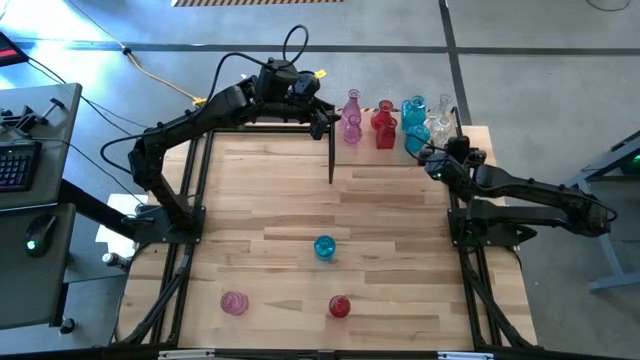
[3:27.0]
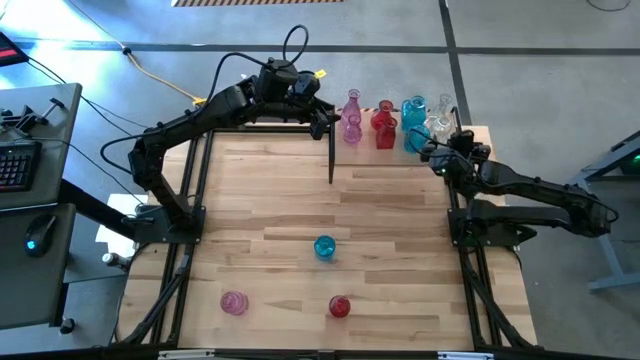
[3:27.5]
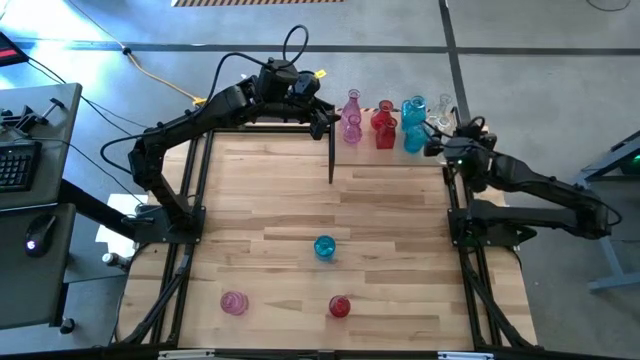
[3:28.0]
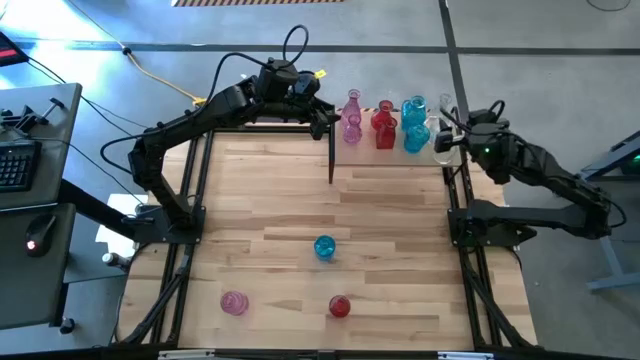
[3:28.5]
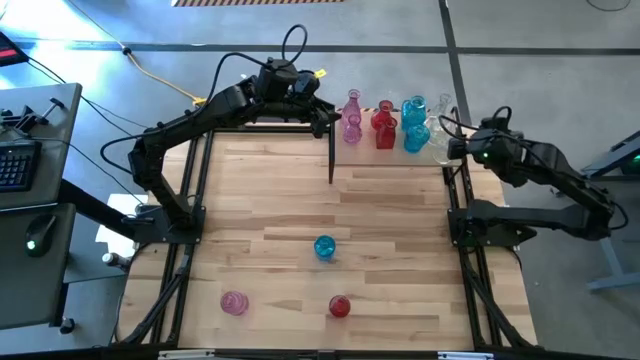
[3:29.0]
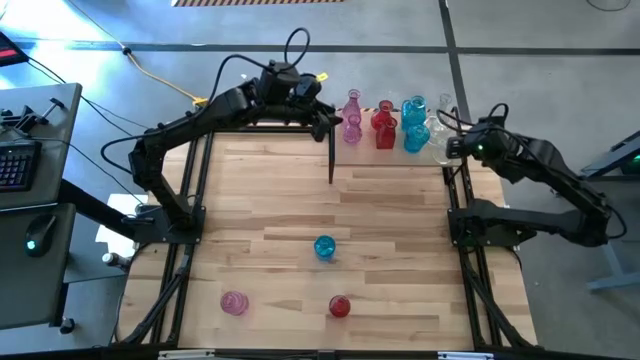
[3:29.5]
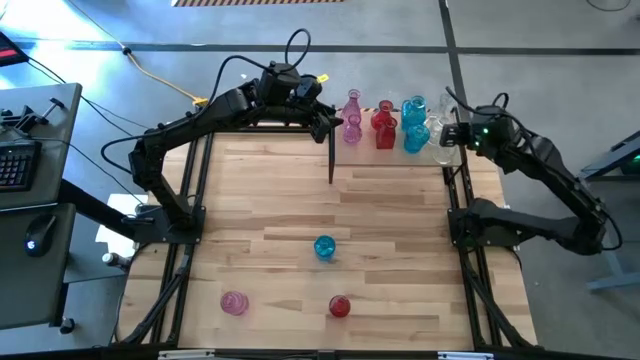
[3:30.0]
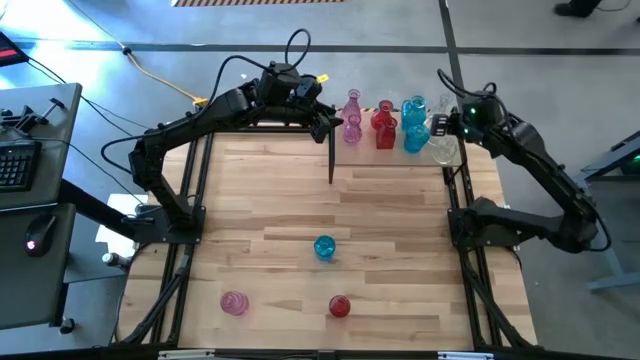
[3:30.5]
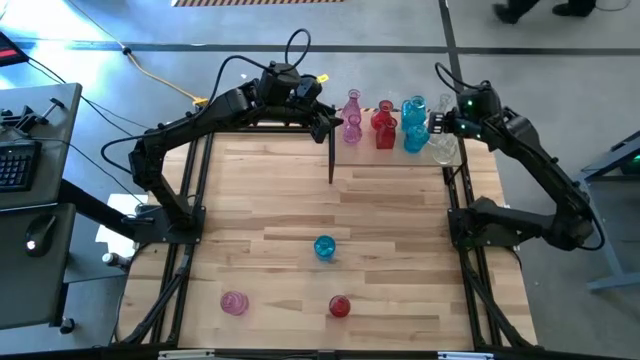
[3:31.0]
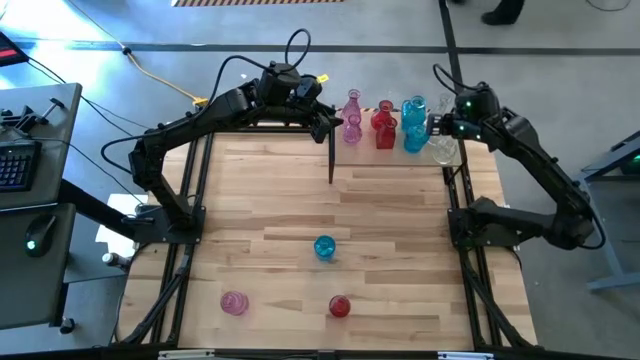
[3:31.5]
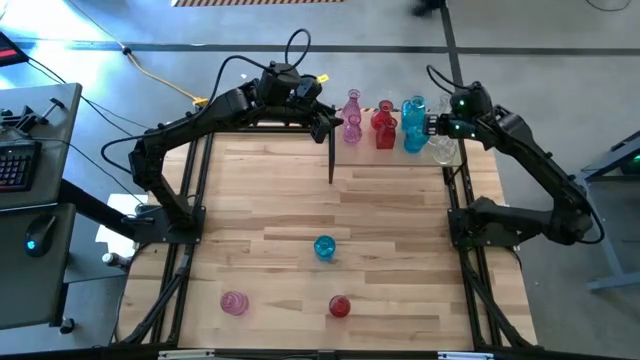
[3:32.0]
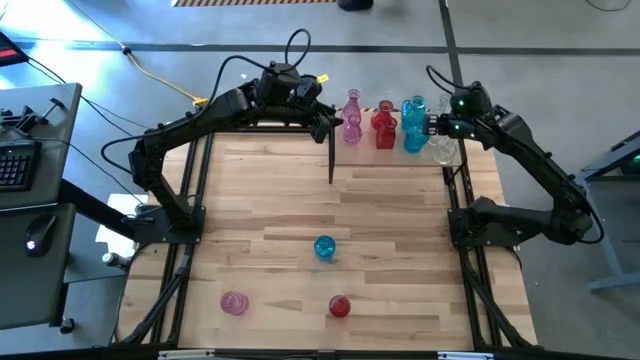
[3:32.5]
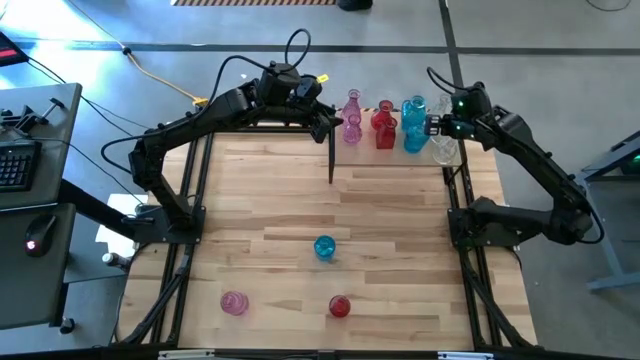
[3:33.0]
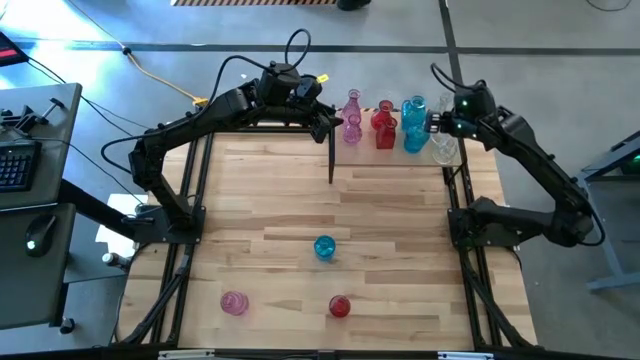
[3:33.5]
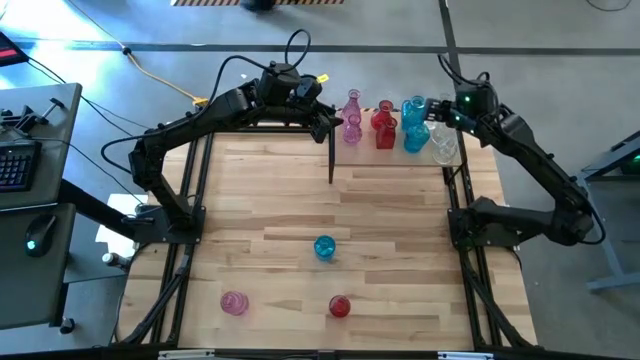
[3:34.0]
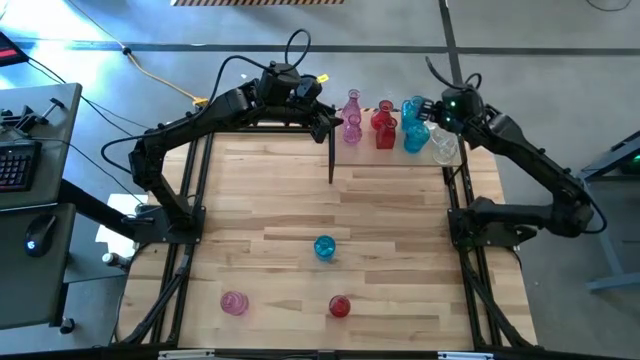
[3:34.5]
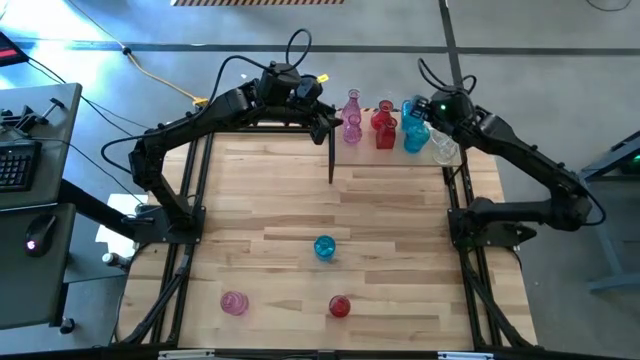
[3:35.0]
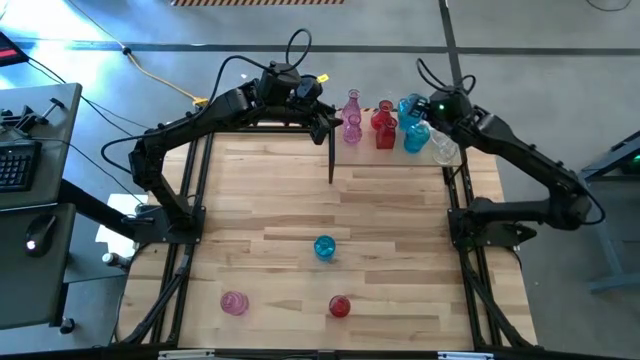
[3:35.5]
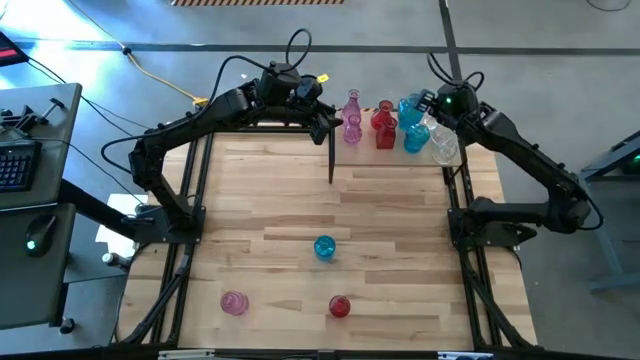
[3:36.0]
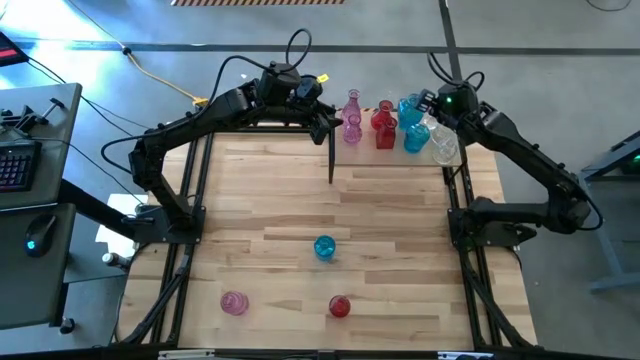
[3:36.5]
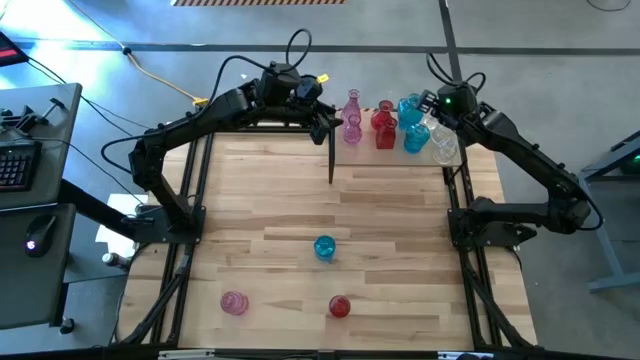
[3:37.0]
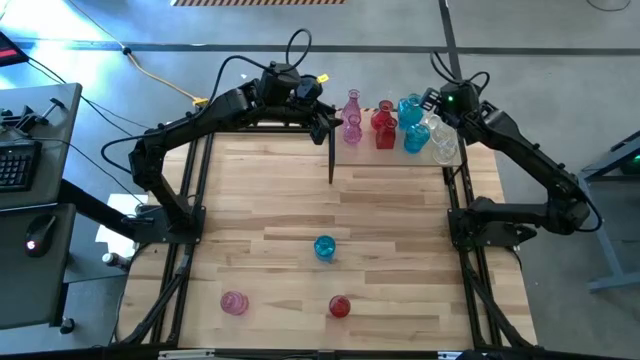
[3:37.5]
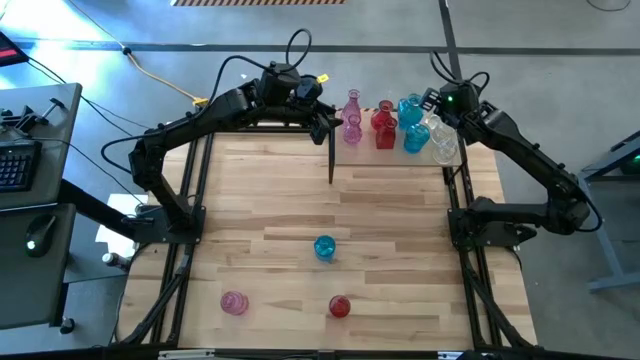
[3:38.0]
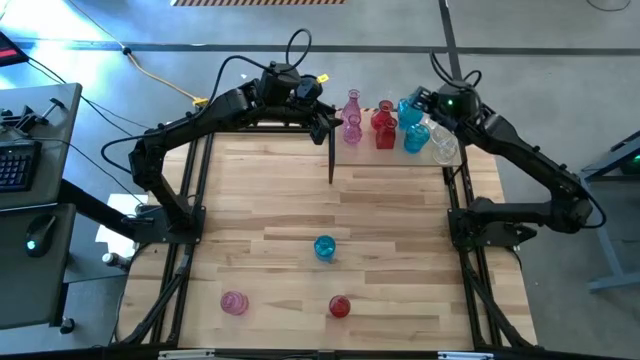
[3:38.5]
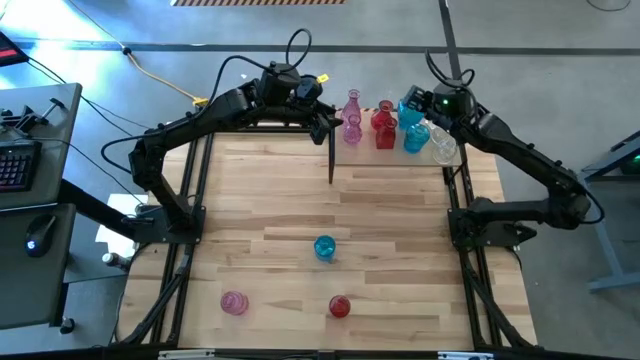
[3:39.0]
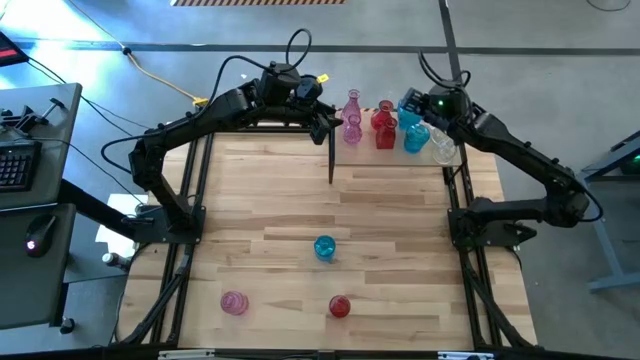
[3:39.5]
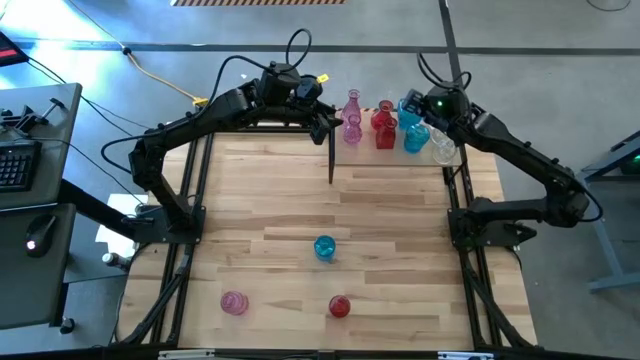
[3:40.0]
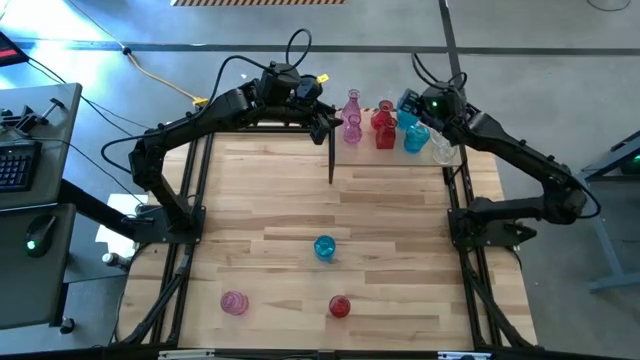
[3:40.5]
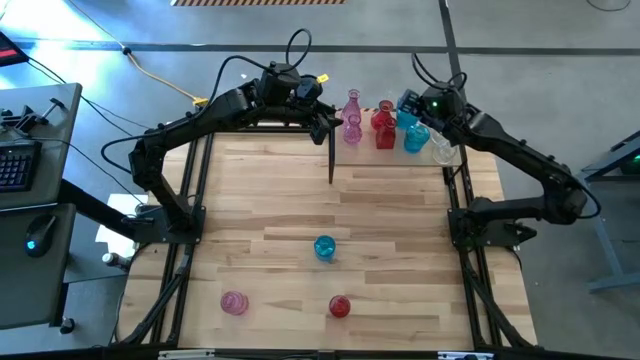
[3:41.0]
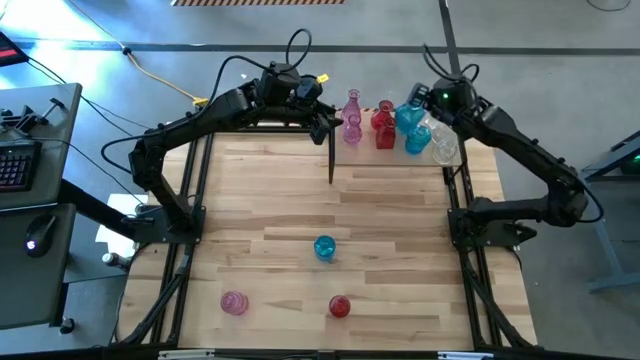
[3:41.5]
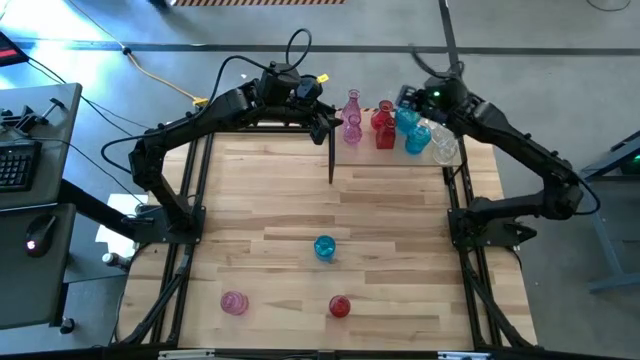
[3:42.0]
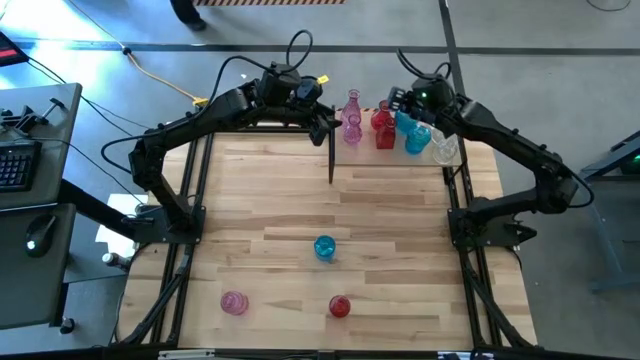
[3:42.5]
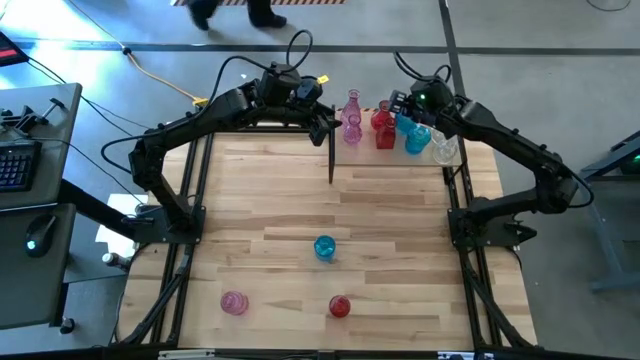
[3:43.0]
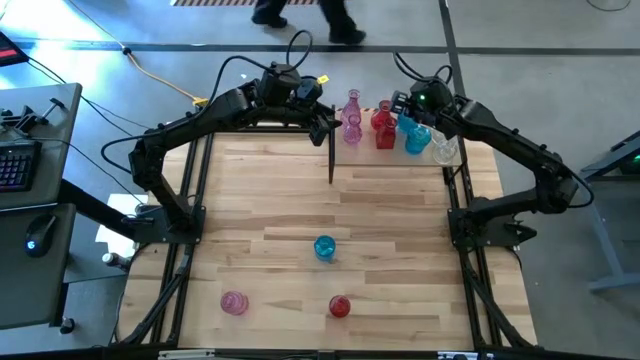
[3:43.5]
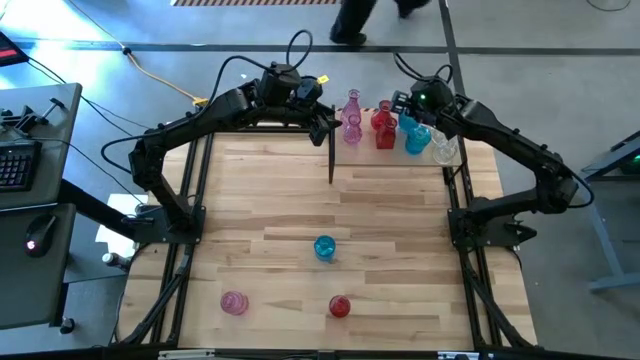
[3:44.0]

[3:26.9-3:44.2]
Task: sort vases onto shelf
Adjust the vases on the shelf

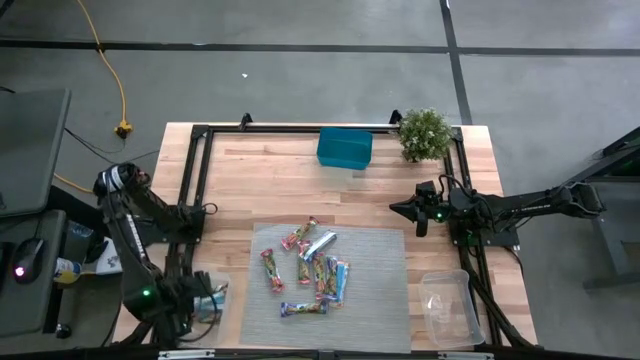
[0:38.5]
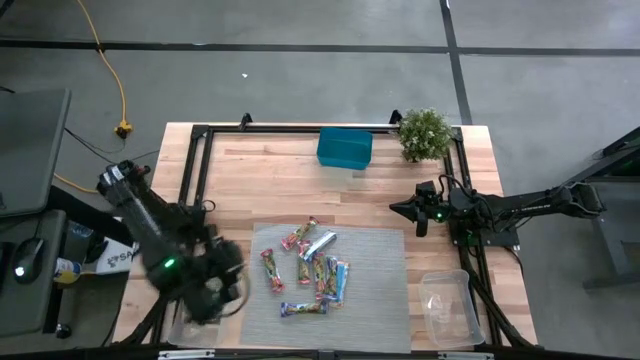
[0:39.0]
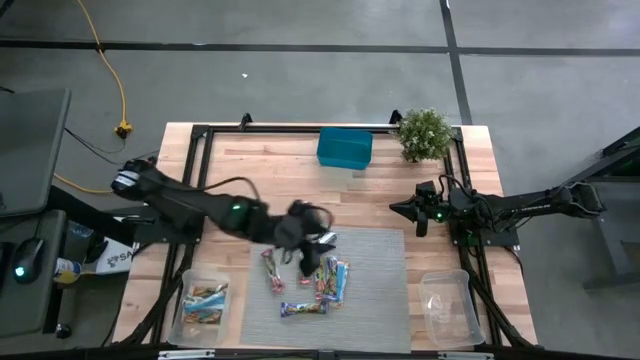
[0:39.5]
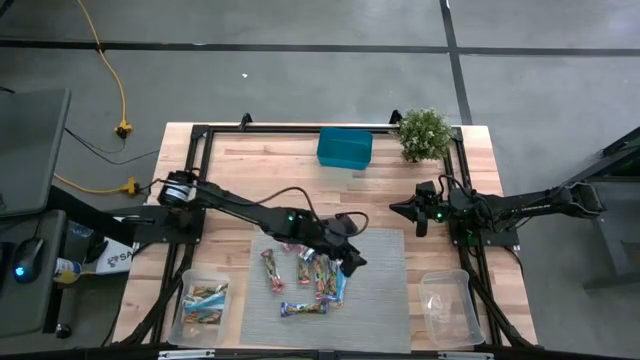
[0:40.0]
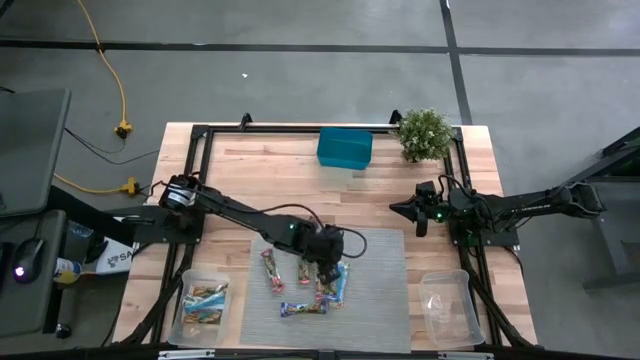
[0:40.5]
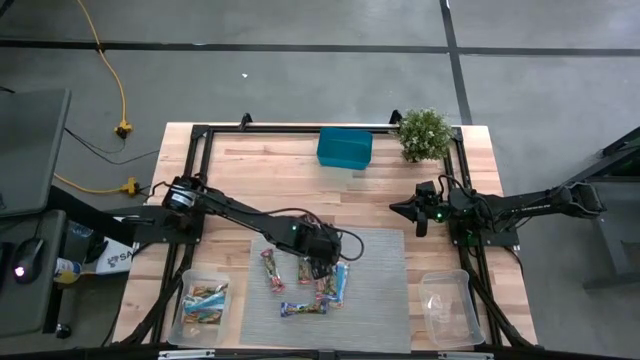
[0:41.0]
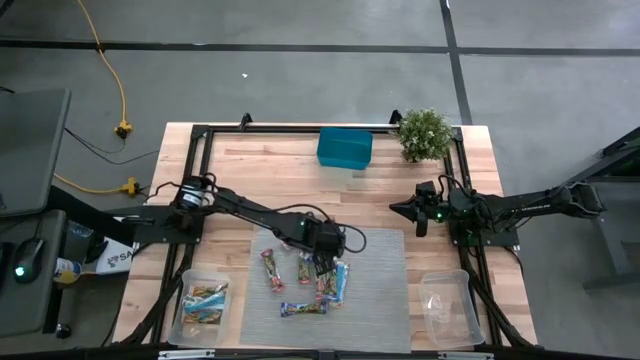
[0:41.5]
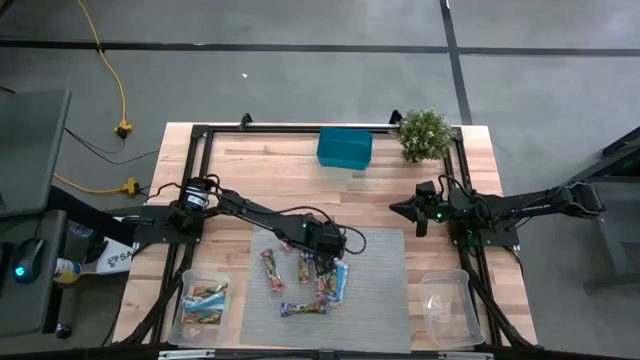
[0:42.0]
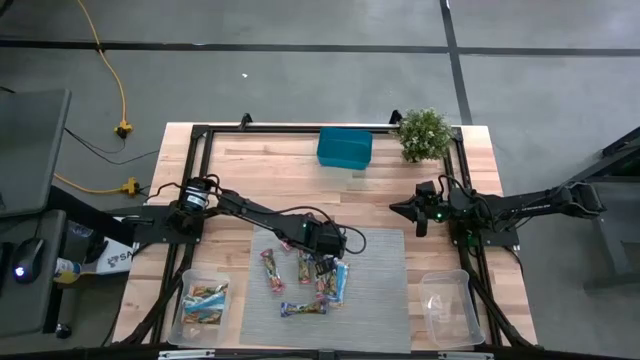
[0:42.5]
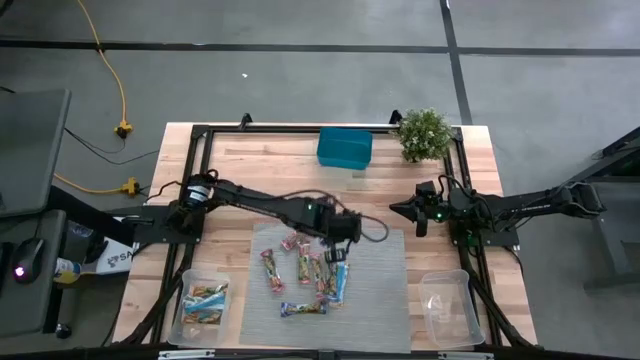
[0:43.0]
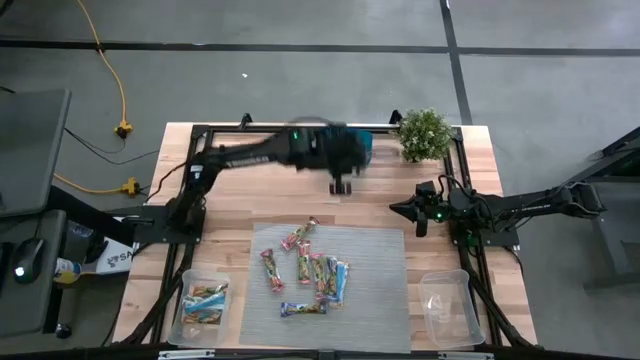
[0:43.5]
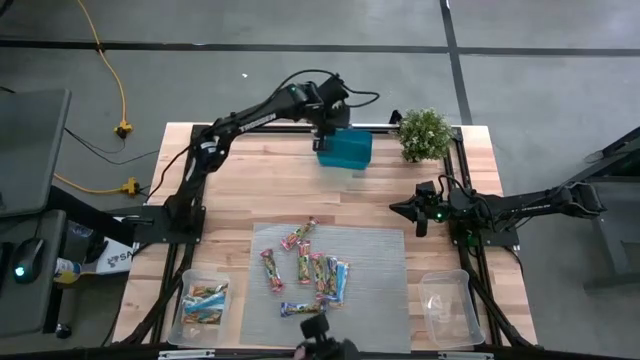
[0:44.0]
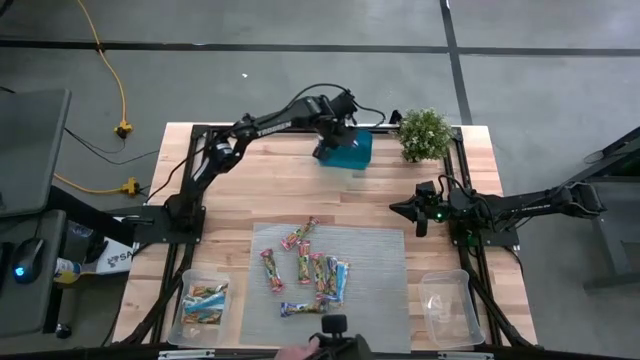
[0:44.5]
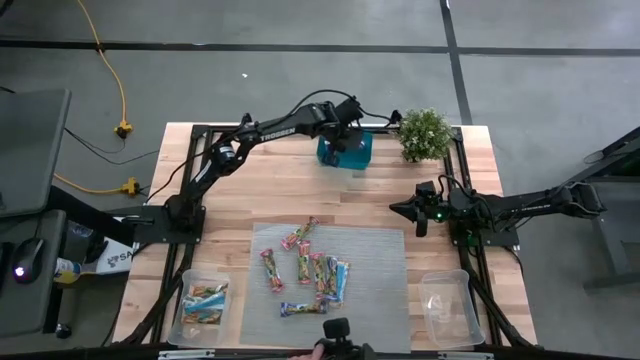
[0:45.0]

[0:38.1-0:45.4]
Task: Pick and place Granola Bars by type
Put the blue granola bar into the blue bin
